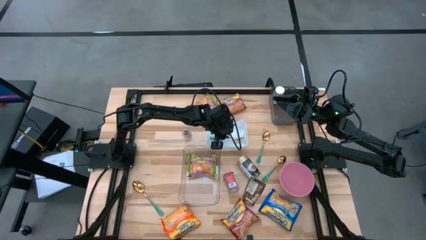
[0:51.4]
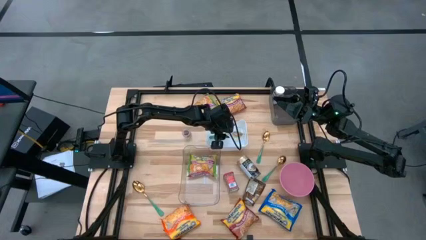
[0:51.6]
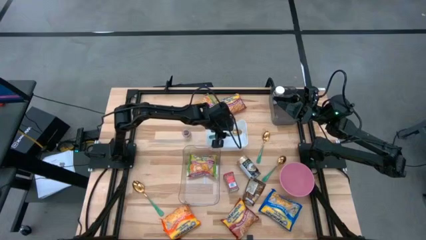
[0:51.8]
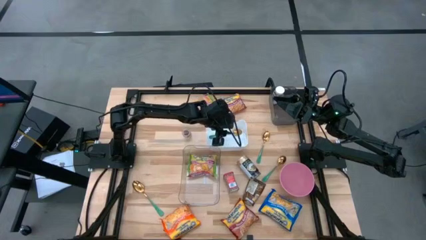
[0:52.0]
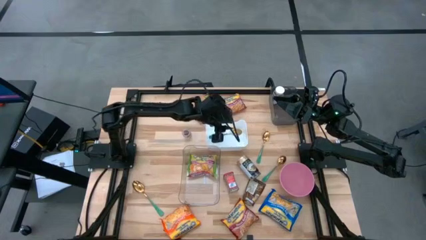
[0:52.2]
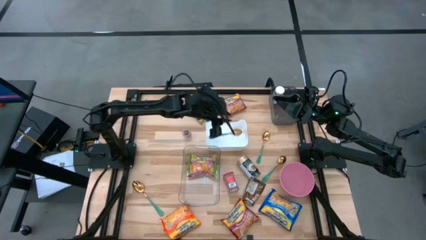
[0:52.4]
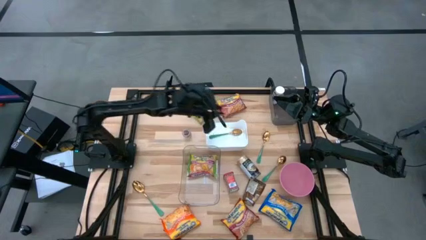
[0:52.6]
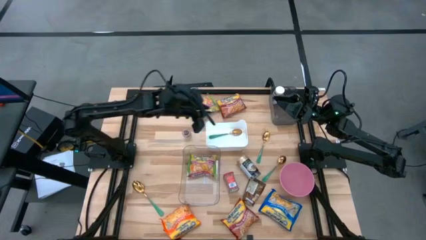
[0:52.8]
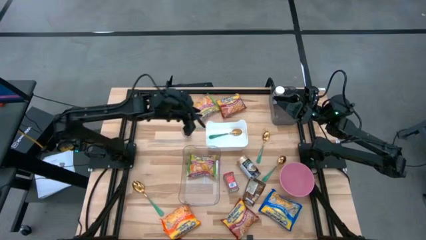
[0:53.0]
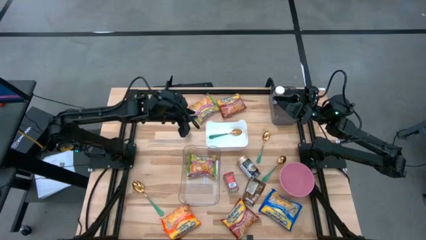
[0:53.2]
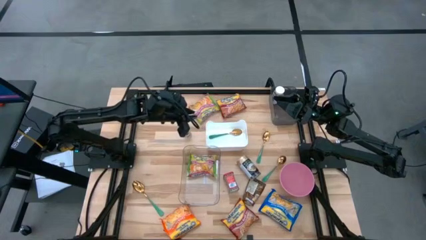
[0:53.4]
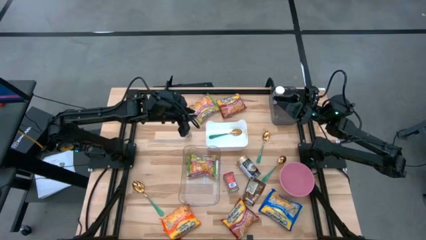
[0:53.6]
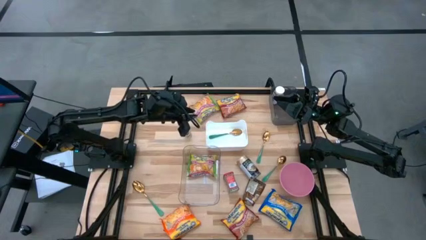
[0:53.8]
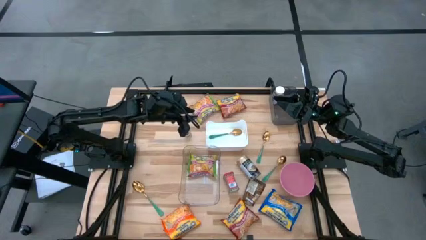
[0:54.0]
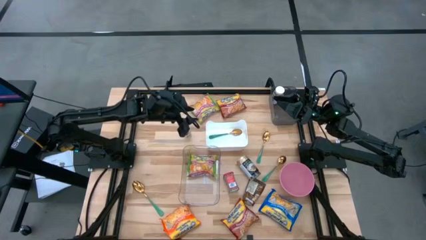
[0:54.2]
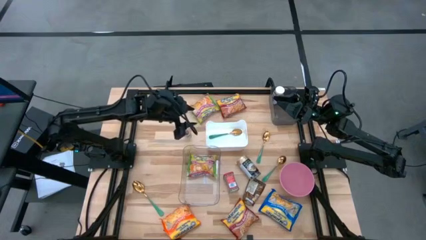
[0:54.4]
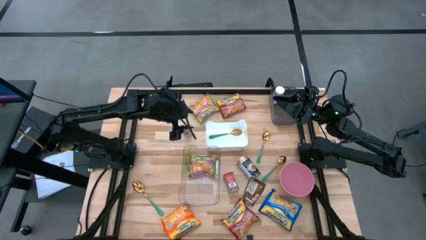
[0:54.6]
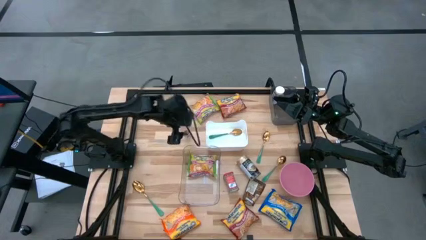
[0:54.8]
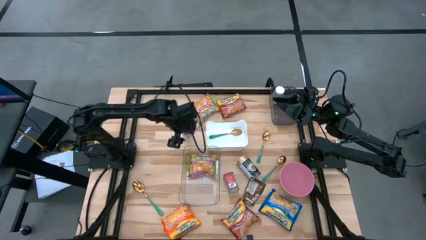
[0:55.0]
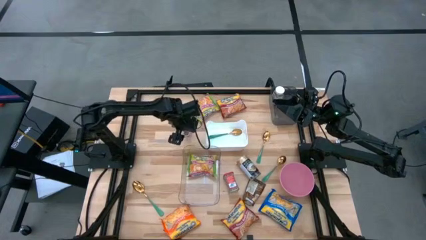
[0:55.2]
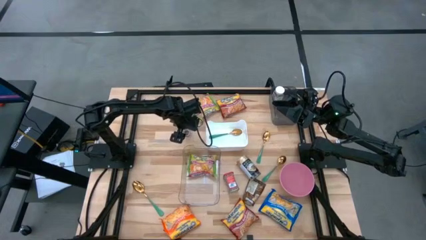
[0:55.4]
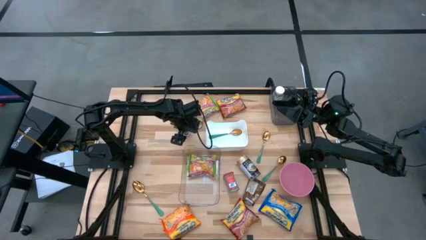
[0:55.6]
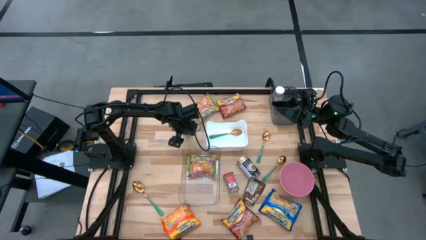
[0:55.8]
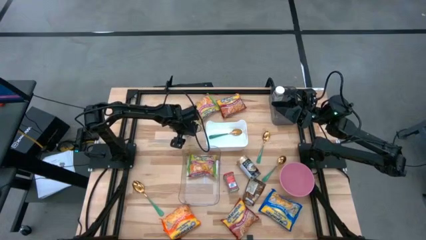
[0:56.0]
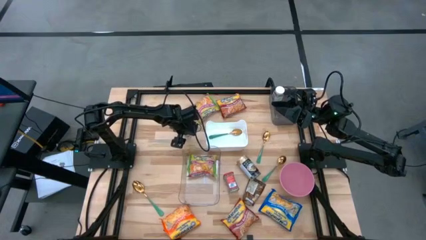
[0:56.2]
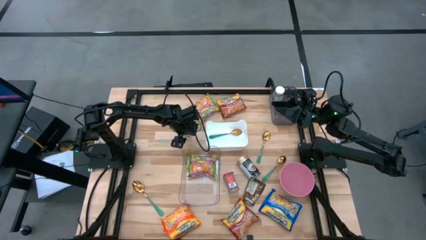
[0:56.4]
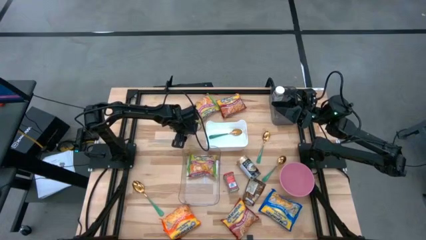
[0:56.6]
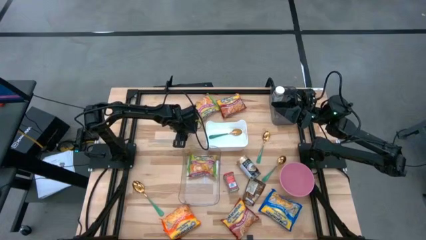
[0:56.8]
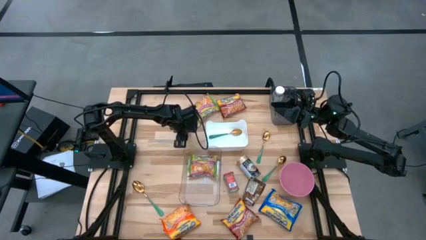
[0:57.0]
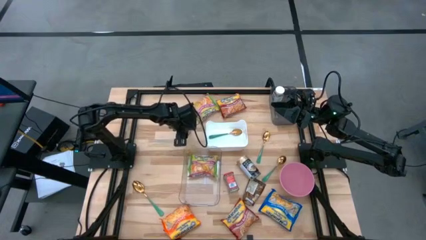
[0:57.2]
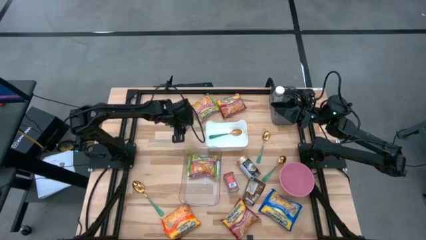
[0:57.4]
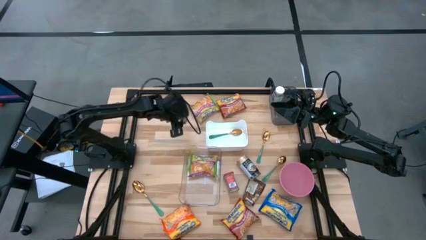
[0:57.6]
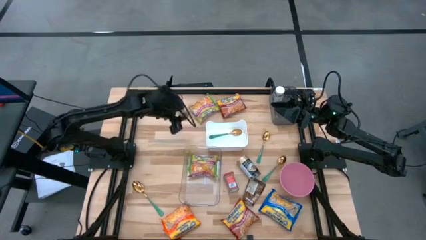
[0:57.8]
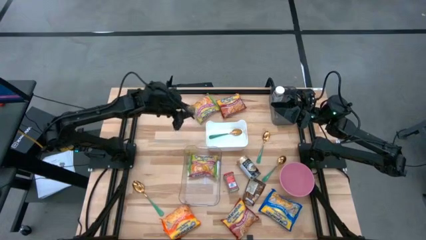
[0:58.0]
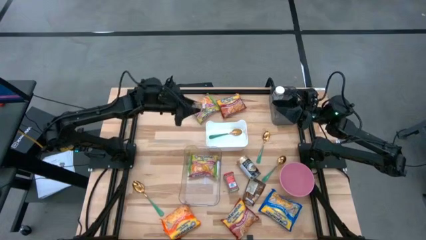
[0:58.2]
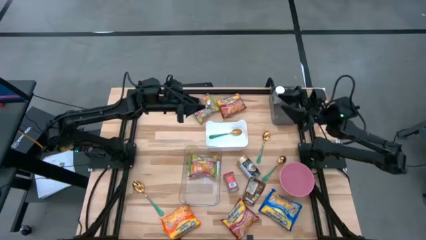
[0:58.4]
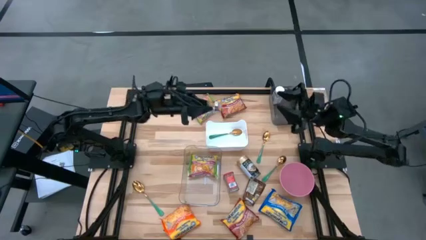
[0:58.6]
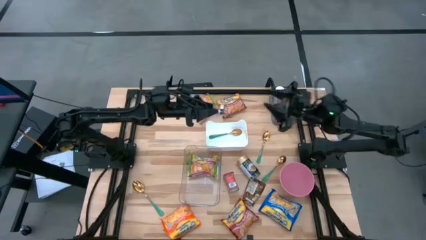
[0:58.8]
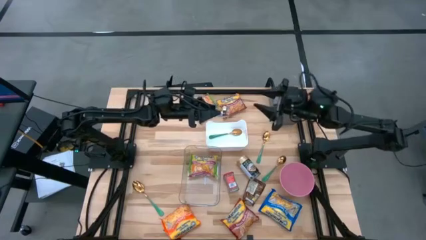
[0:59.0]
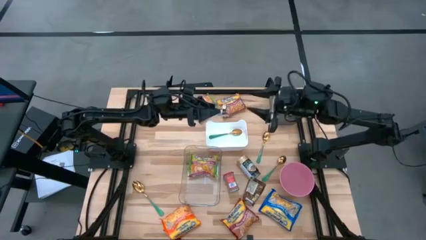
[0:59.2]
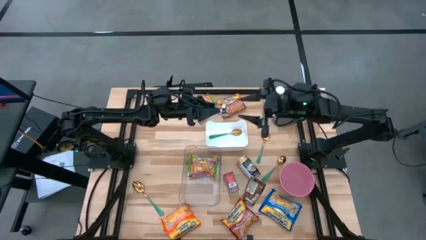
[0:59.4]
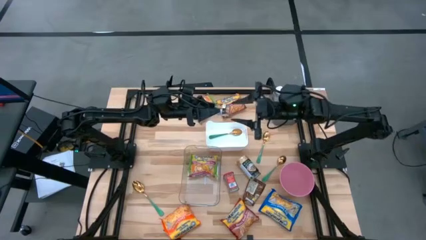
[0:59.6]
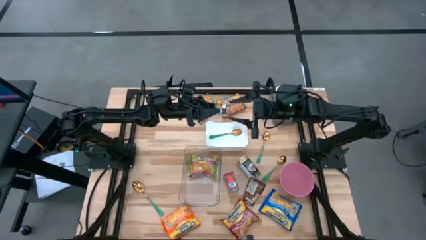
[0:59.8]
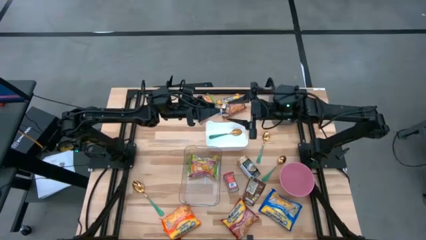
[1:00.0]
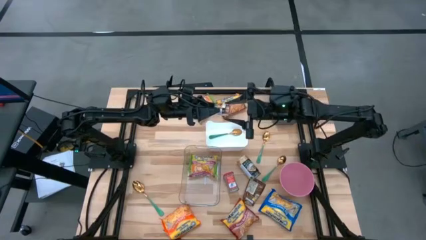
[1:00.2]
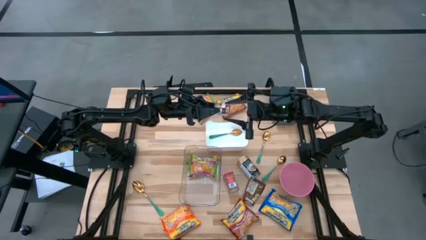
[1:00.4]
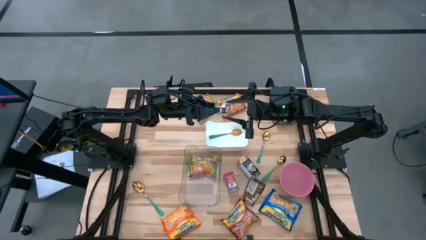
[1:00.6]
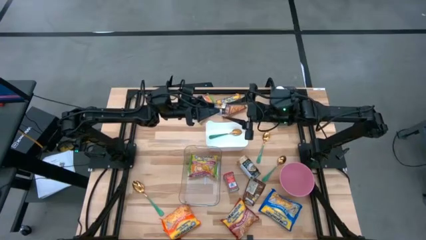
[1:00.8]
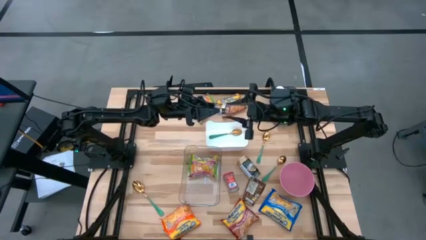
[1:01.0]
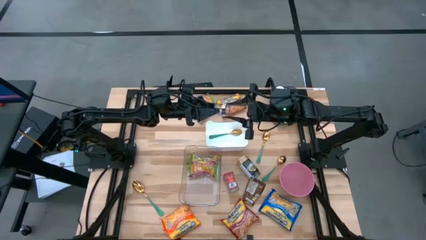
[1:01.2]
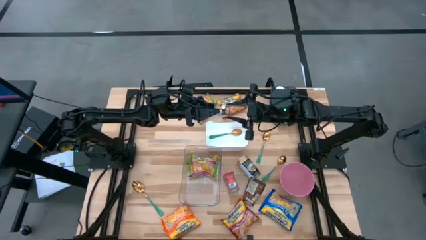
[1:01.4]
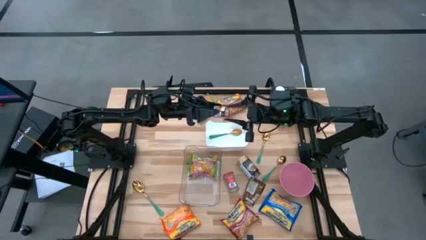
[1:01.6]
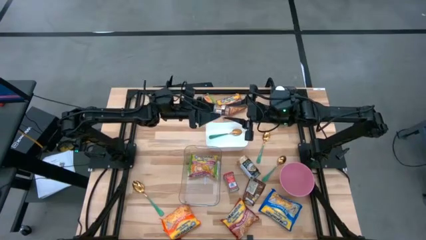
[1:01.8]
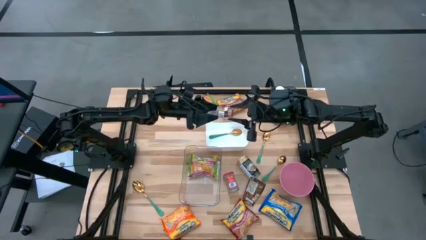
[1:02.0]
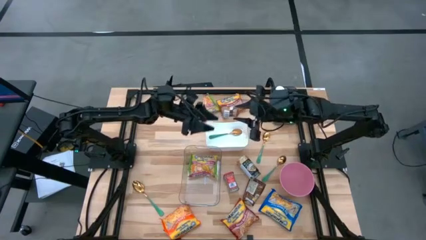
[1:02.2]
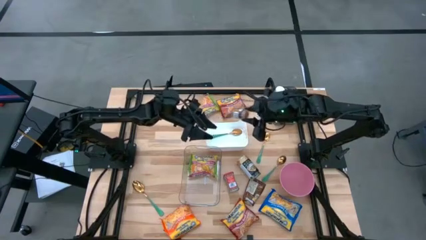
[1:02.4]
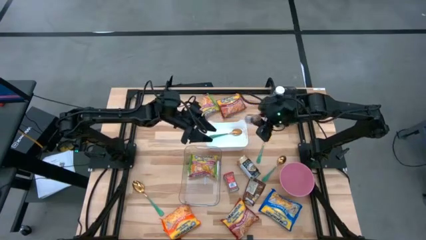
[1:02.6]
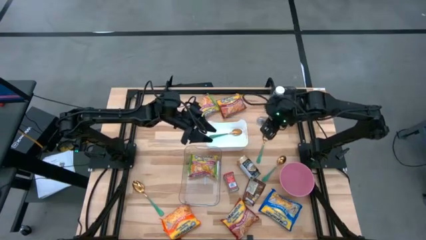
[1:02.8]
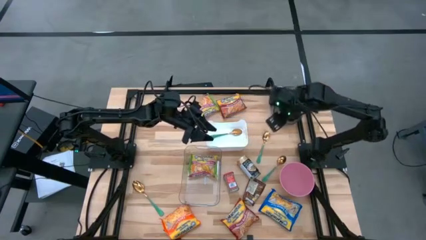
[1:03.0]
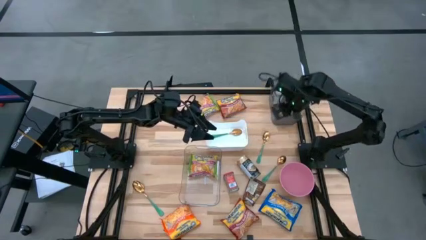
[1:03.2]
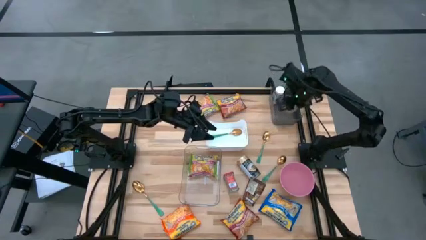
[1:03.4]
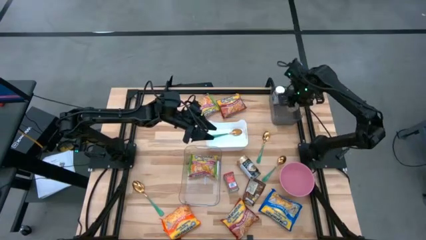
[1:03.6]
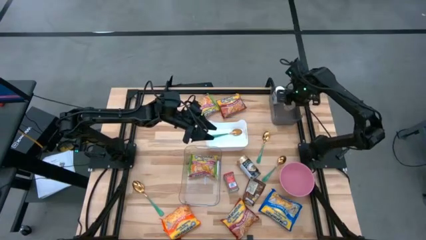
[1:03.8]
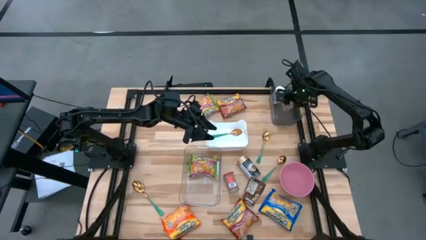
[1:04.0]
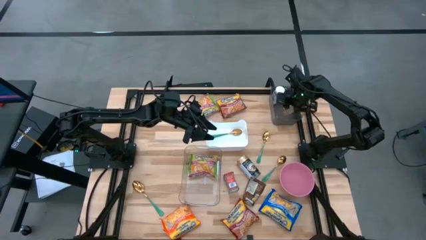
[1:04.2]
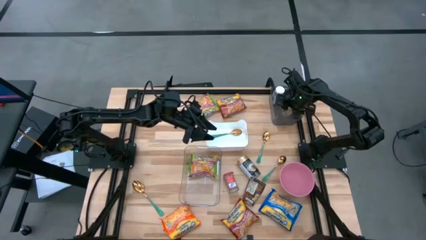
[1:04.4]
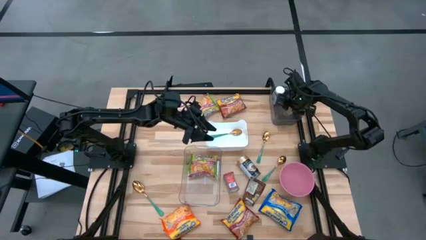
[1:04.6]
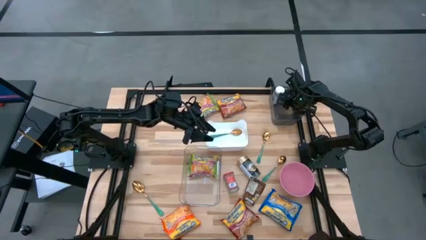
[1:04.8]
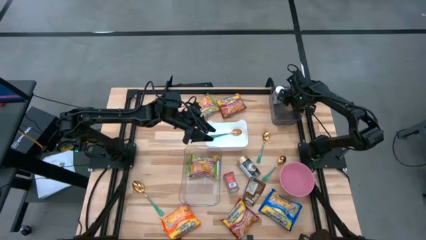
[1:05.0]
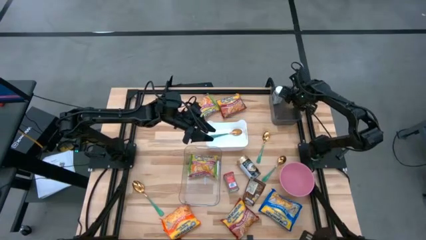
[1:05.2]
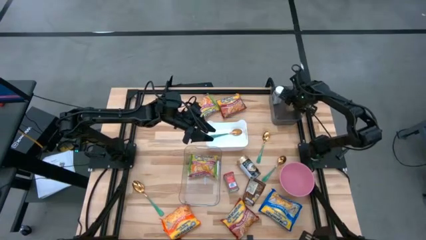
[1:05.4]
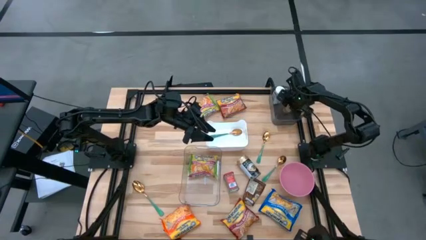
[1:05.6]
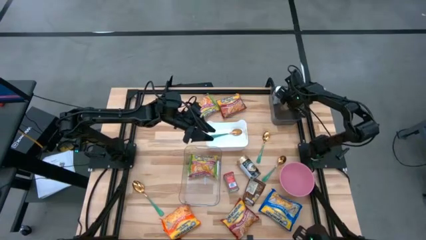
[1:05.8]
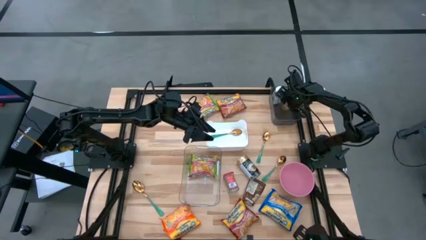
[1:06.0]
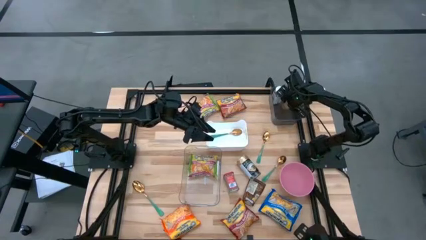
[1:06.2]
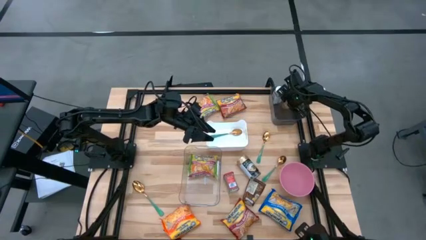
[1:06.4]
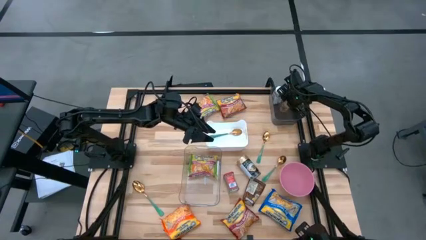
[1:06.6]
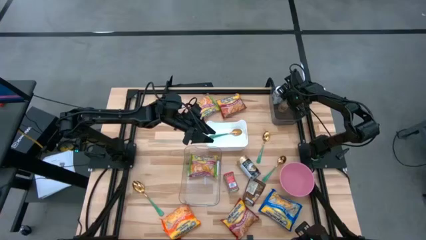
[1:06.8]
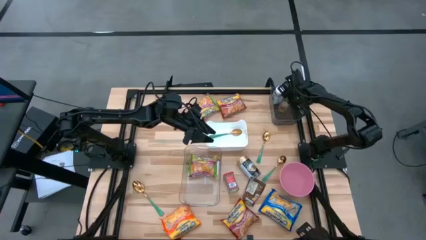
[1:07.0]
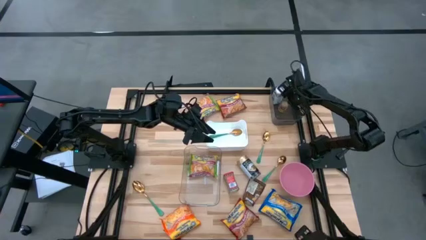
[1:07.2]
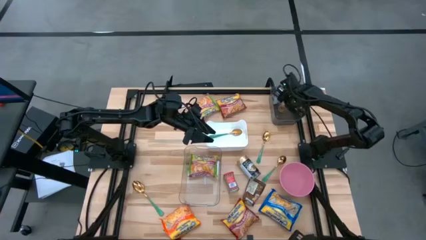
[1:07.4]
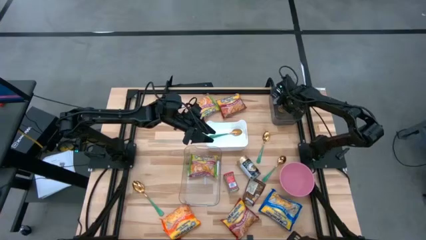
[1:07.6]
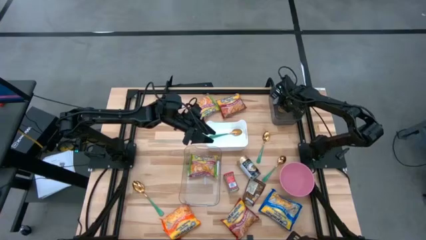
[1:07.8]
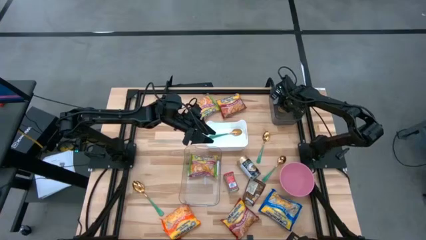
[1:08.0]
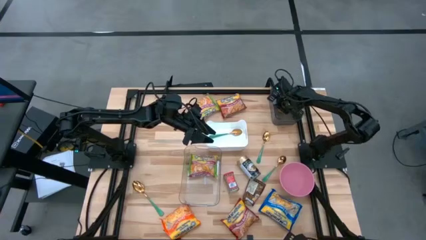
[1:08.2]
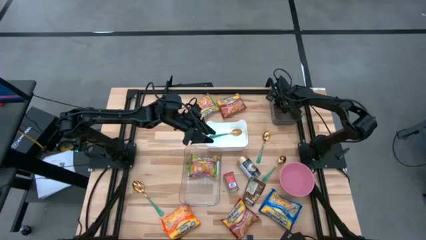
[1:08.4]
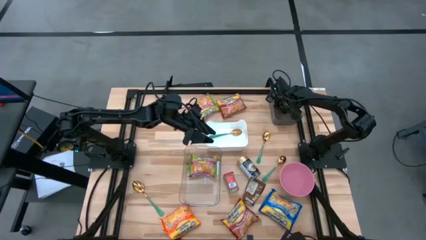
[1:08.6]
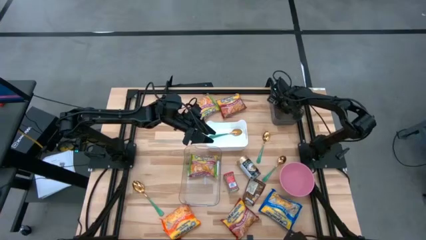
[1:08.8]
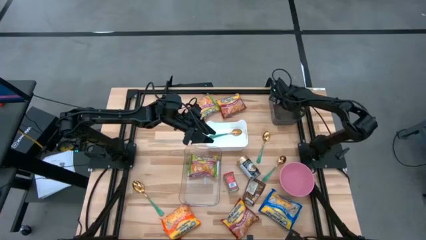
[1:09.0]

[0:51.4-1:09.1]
Task: Pick & Place Food Item
Put the brown spice bottle into the black bin
